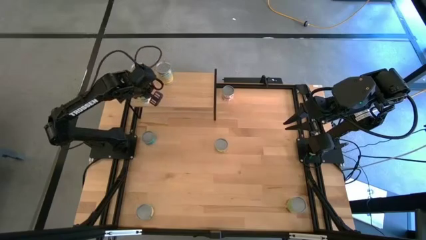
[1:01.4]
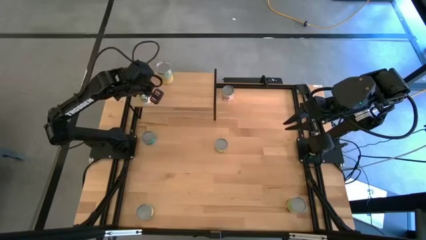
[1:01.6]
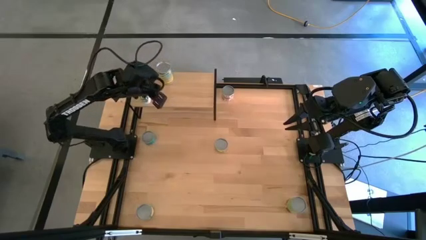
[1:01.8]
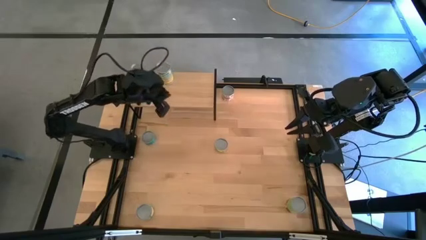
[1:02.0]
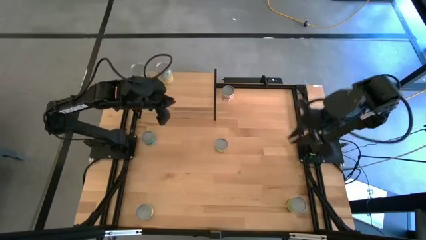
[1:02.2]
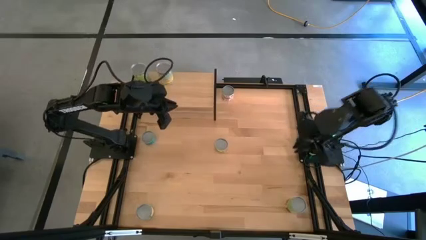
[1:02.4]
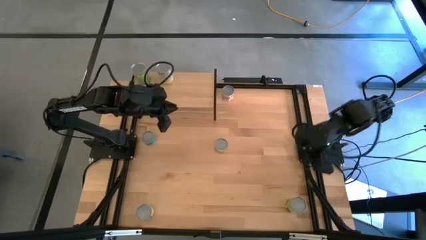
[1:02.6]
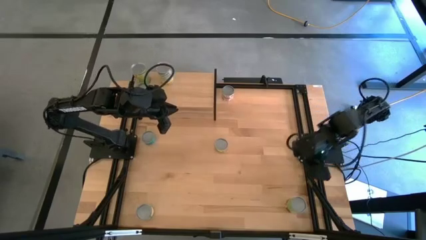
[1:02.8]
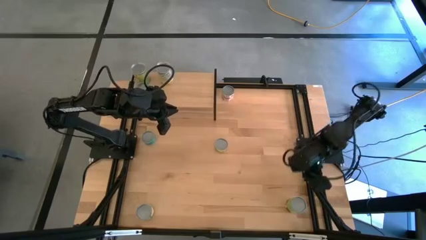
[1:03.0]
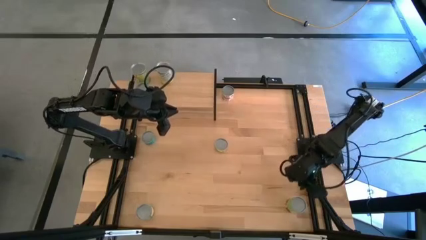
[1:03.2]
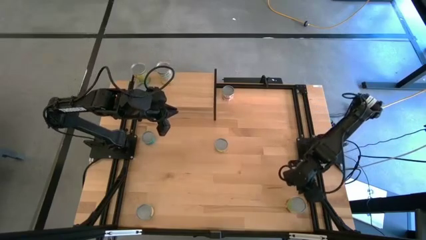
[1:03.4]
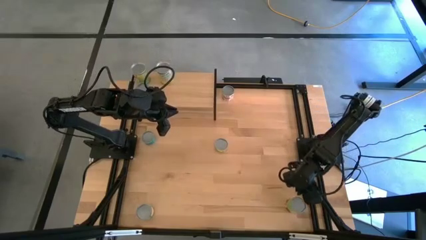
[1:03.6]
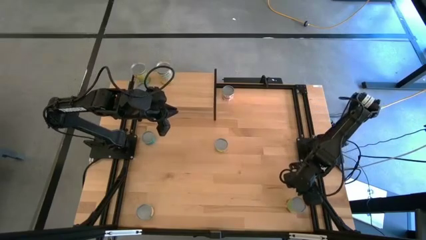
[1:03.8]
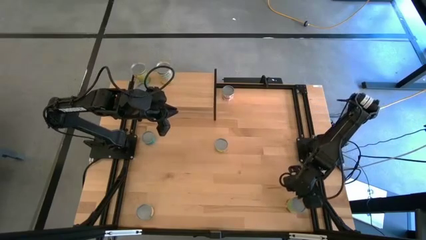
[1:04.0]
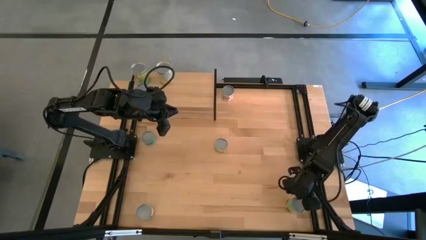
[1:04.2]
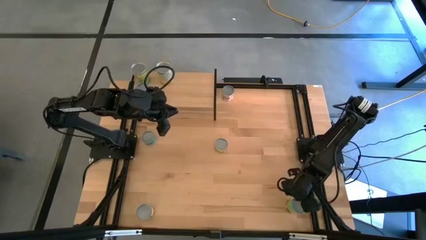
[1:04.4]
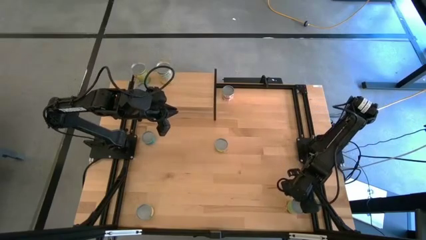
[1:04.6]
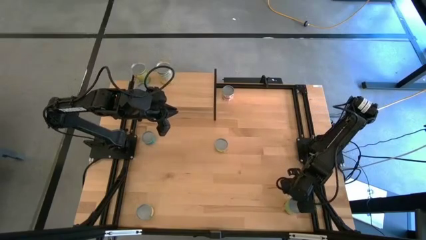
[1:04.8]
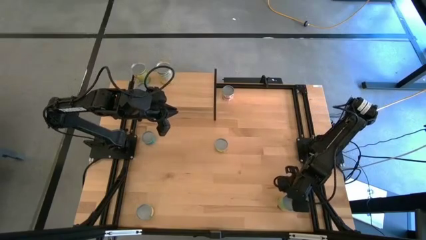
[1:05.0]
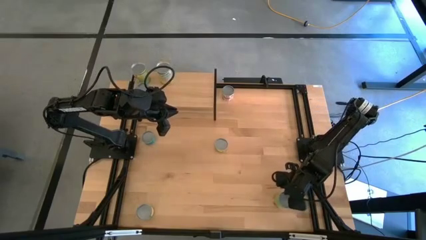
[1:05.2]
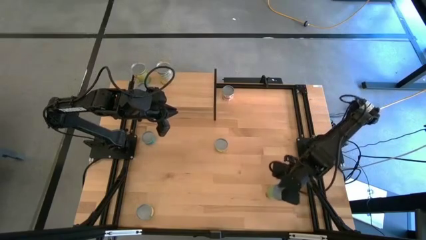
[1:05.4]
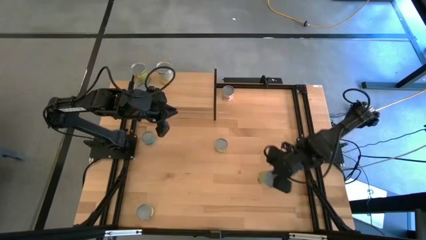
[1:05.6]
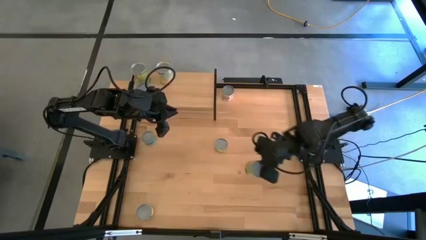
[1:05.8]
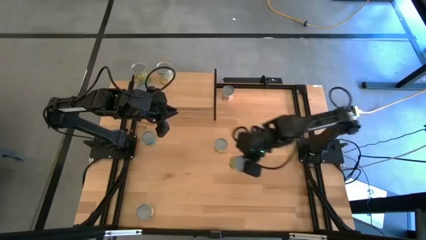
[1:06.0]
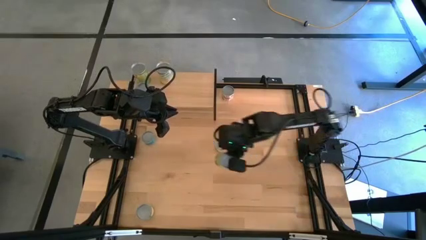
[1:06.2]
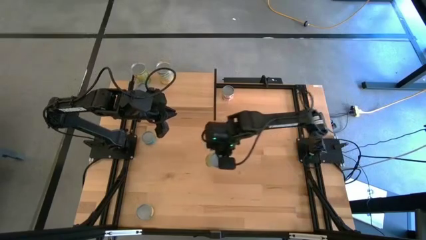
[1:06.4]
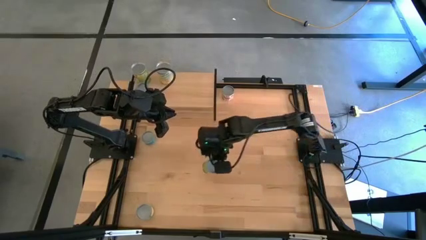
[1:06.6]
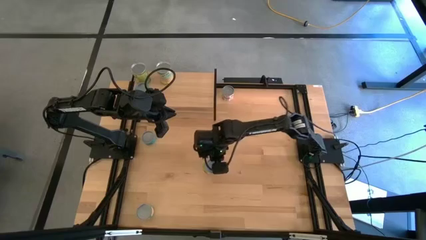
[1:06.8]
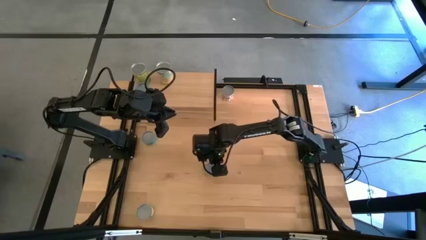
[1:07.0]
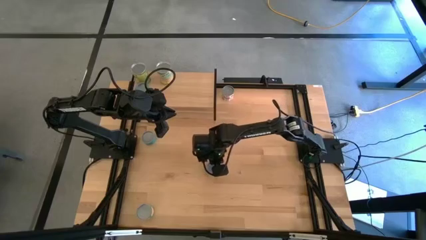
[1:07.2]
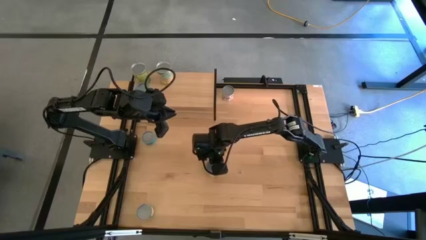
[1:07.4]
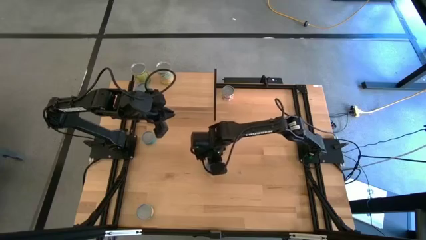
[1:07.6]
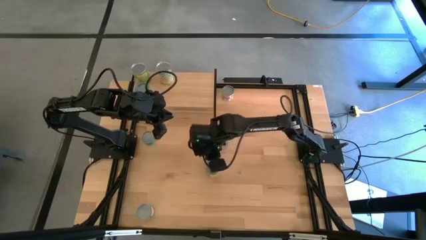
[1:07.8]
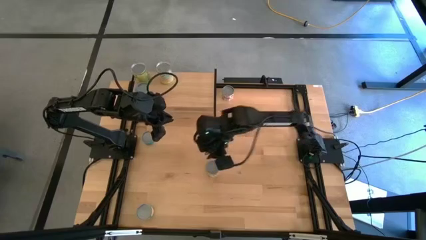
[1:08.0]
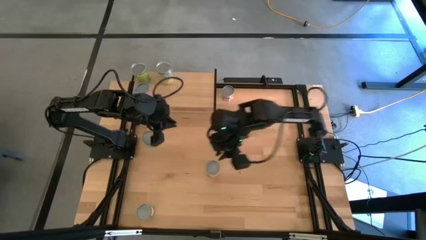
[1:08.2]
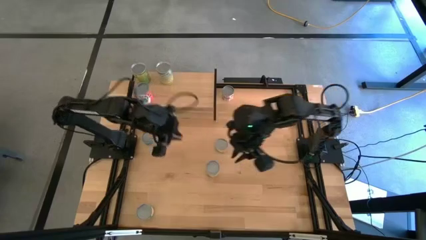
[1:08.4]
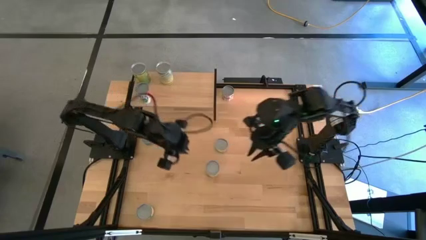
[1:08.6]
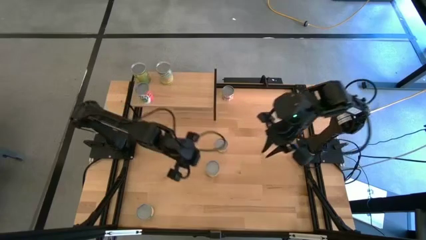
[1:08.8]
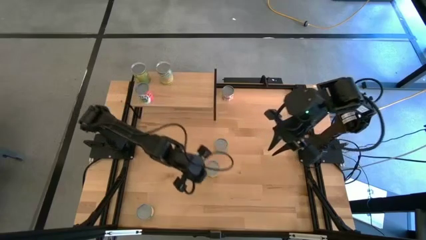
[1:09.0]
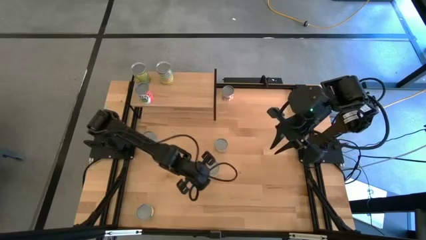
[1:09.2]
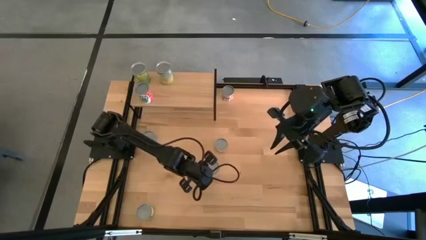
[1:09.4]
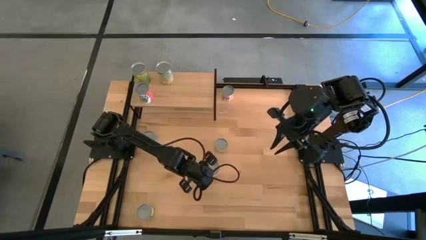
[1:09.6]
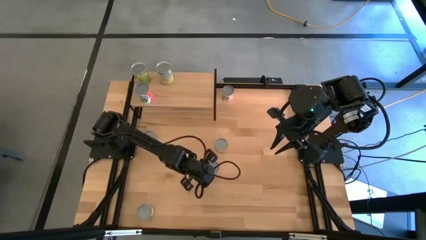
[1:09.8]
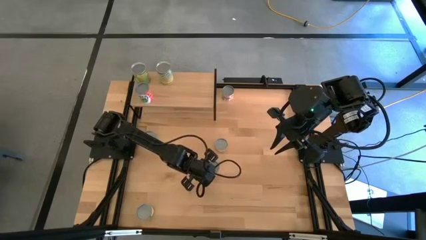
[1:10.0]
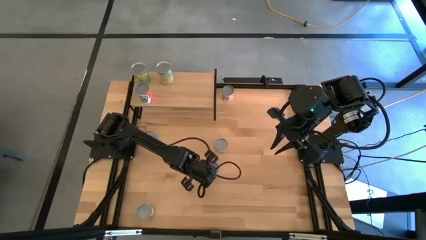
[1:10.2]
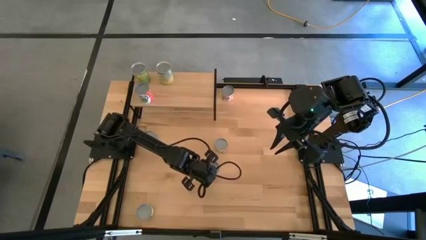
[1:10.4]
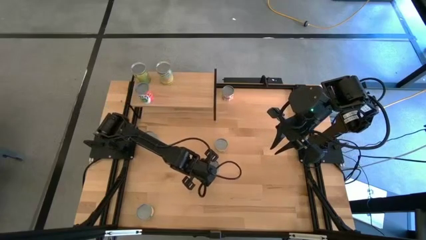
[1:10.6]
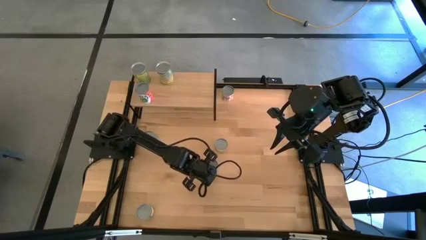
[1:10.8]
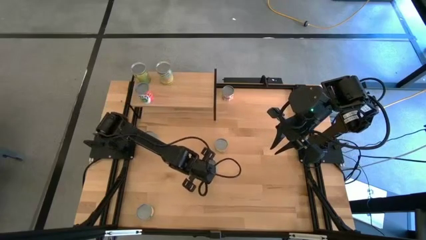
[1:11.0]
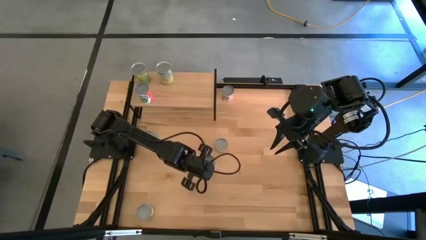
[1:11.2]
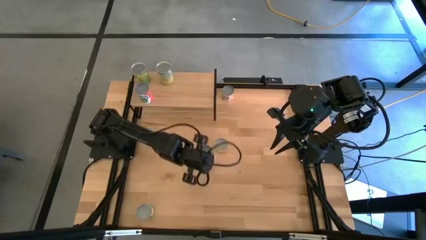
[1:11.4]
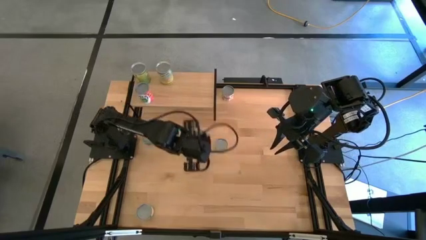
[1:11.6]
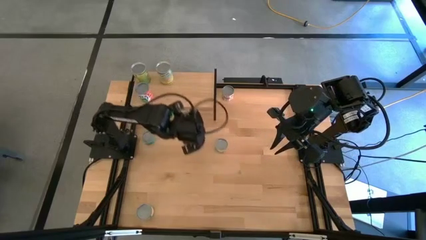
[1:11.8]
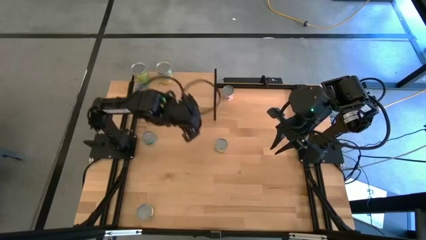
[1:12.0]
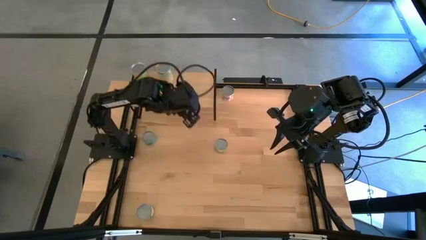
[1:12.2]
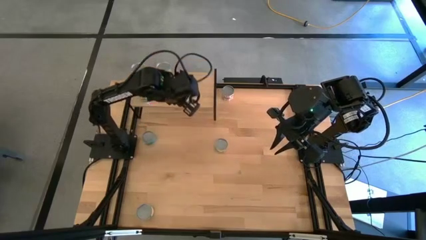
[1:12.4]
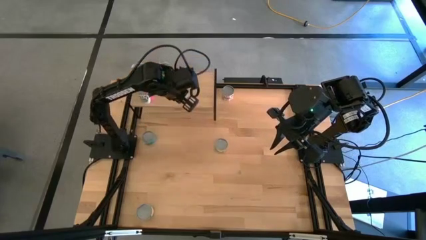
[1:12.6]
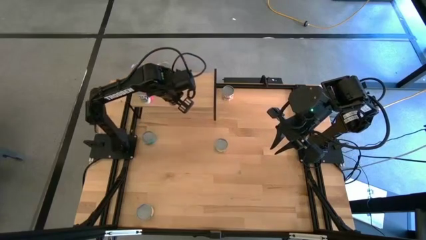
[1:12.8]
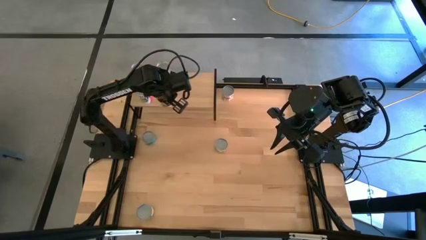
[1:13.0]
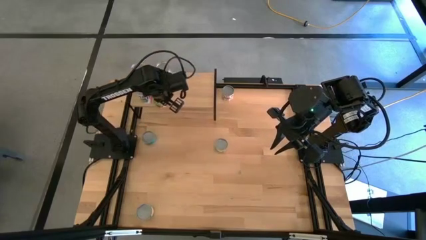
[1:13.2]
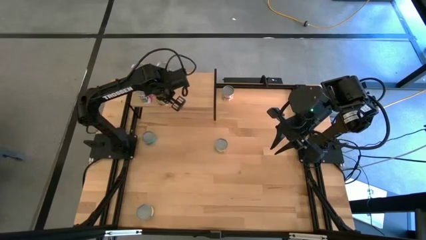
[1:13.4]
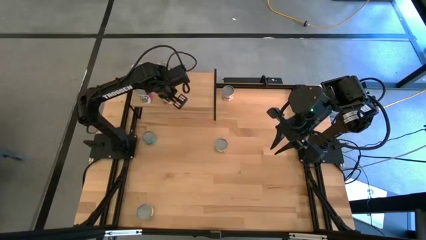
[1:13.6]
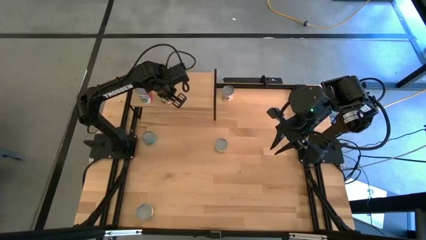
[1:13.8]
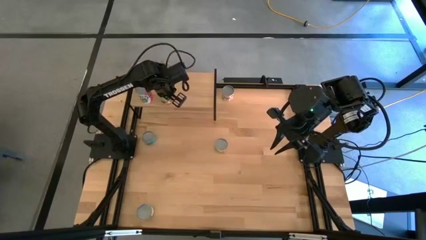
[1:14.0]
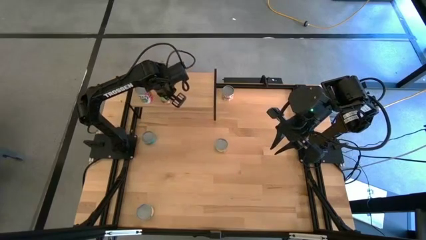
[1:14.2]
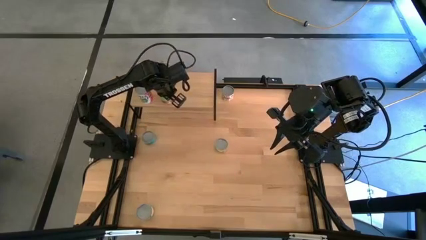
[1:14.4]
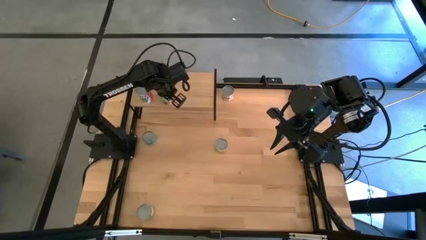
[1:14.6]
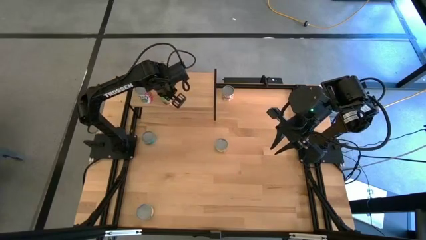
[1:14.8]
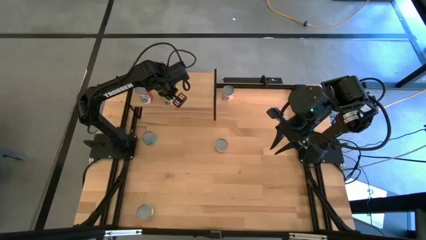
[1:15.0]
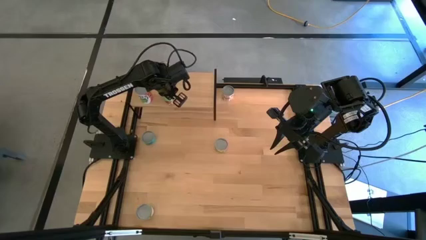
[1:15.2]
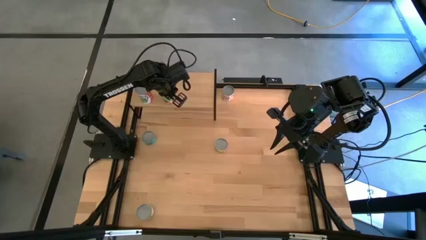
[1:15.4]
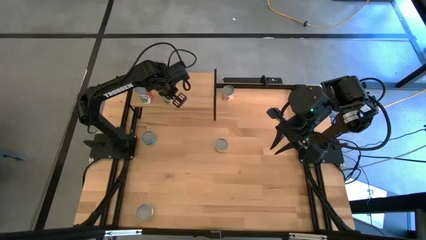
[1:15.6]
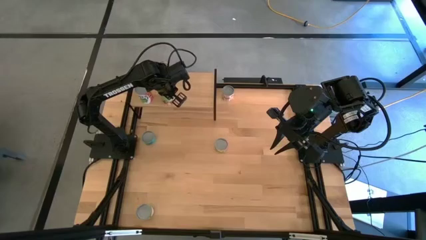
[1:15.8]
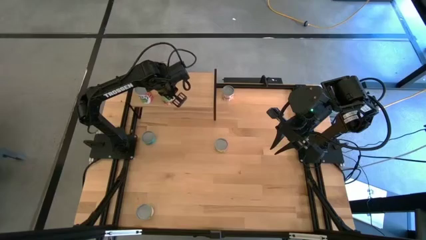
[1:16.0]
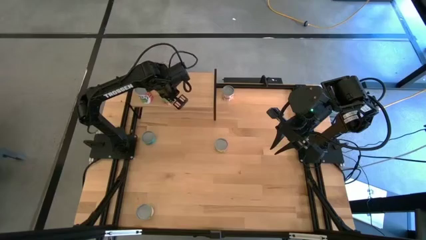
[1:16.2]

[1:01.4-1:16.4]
Task: Pick and place cans onto a shelf
Put the canned spaghetti sauce on the shelf

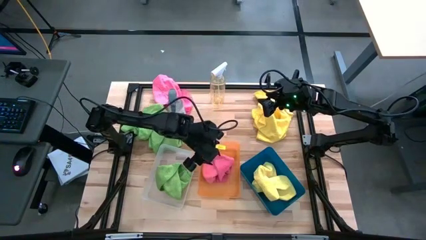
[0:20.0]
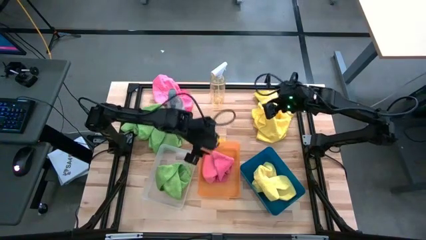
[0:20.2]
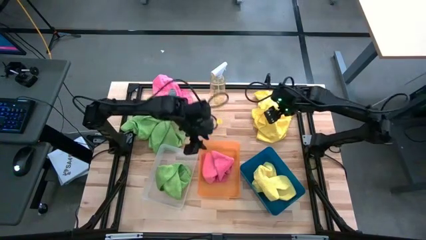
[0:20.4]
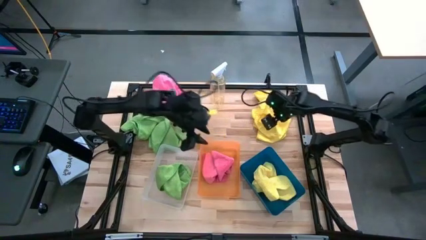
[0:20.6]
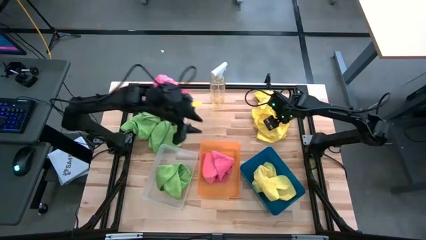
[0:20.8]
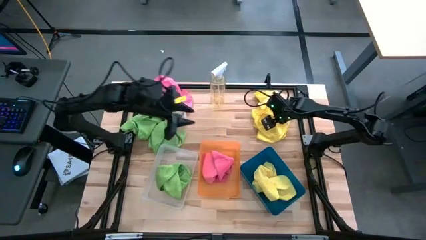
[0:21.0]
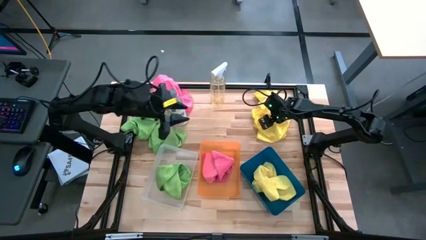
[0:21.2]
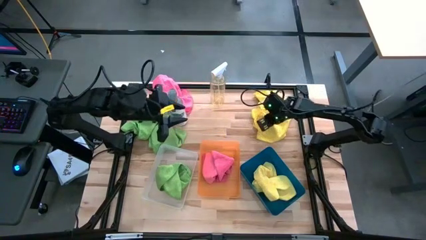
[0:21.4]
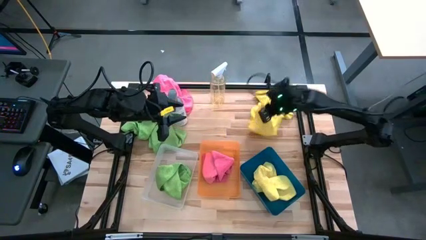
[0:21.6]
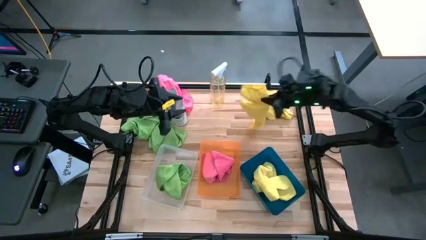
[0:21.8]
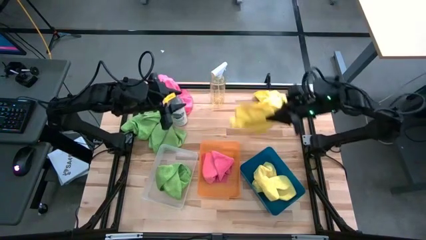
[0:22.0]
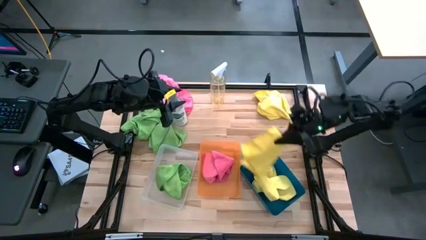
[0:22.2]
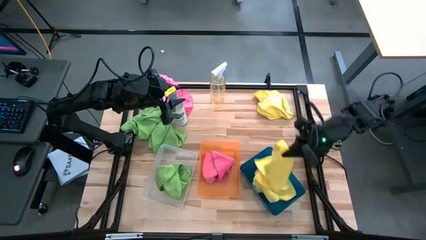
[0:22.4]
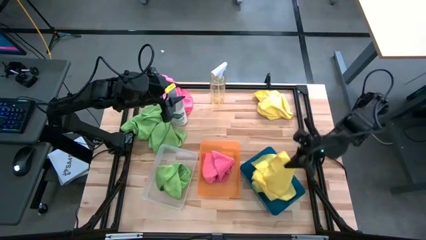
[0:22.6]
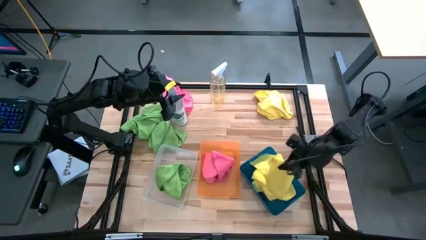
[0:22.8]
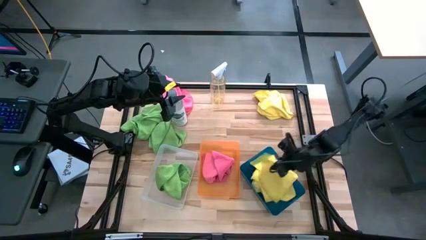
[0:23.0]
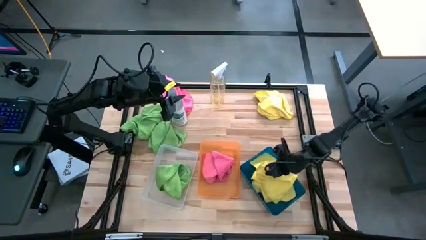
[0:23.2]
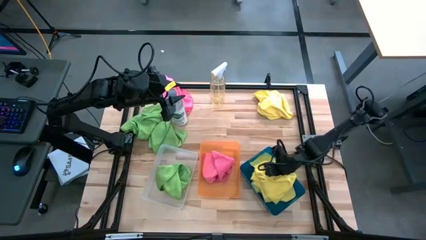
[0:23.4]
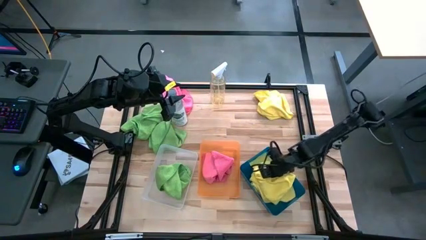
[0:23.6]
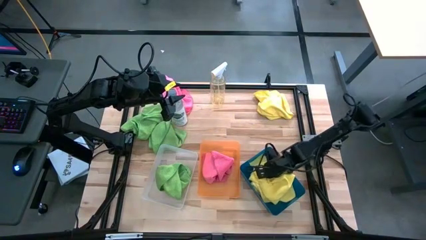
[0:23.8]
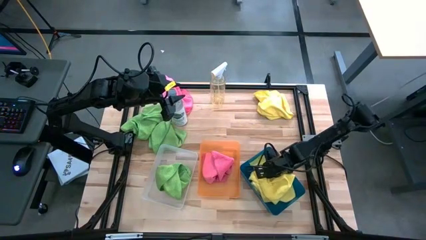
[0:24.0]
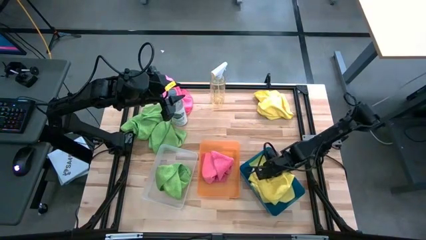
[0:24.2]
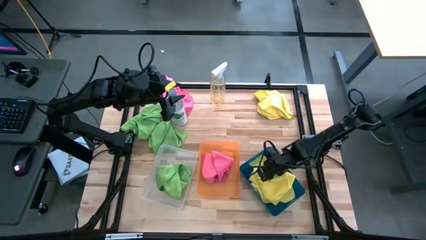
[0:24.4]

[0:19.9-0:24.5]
Task: Sort microfiber towel by color & place in baskets
Put the yellow towel into the blue bin
